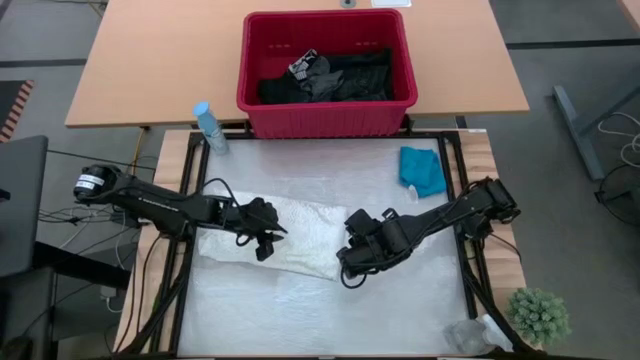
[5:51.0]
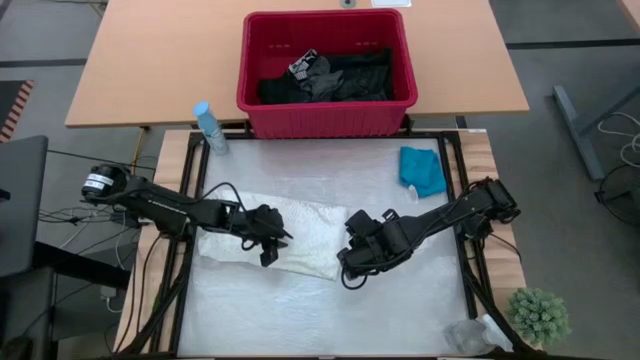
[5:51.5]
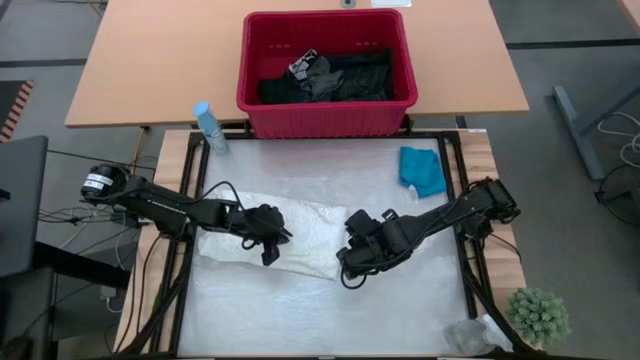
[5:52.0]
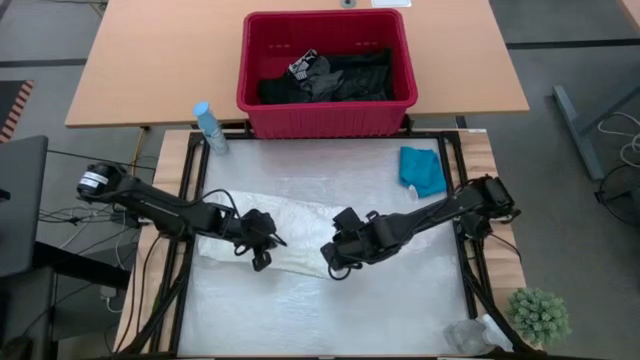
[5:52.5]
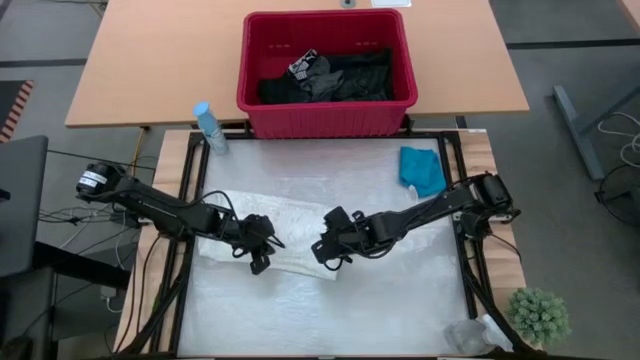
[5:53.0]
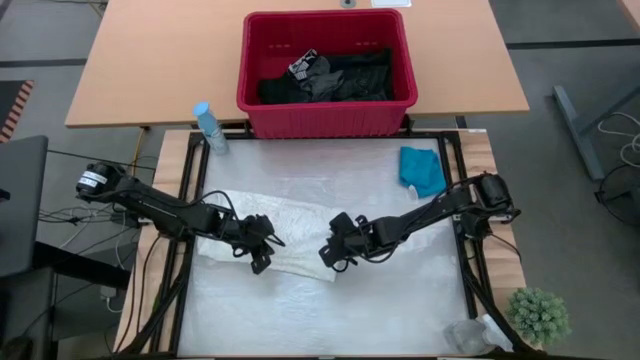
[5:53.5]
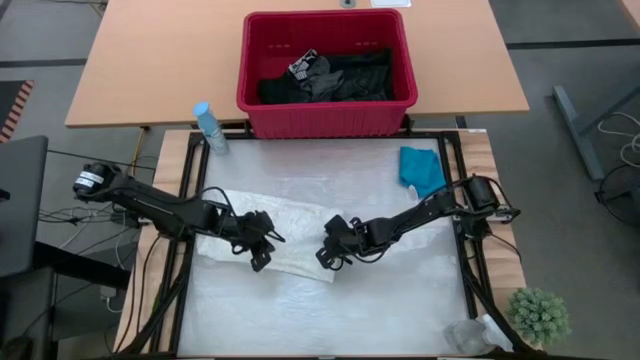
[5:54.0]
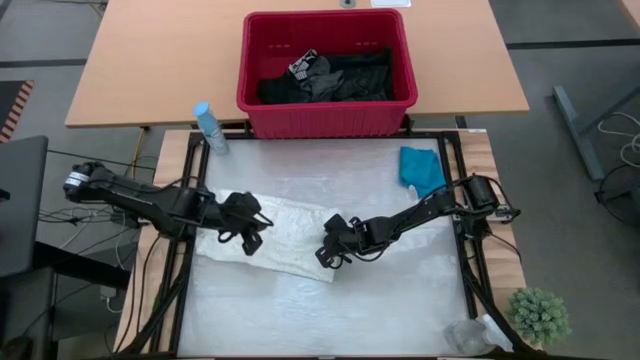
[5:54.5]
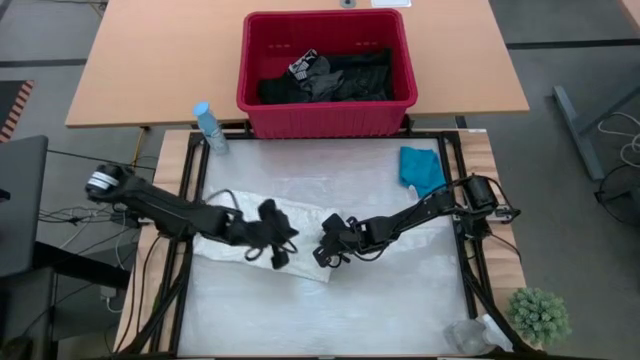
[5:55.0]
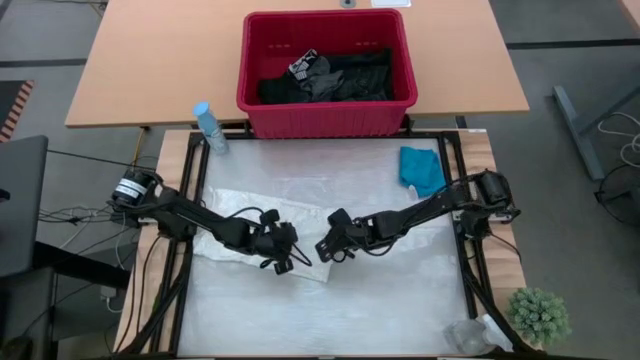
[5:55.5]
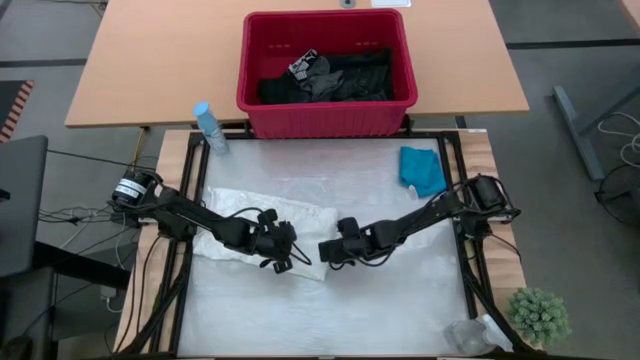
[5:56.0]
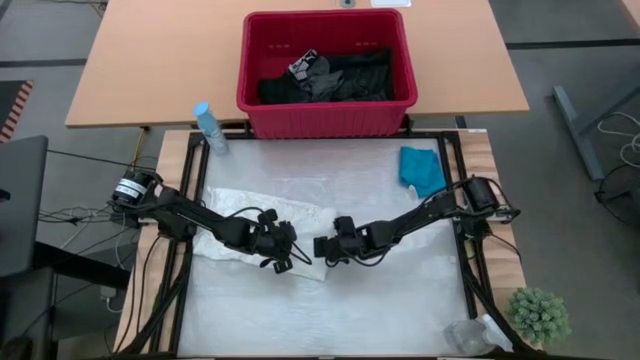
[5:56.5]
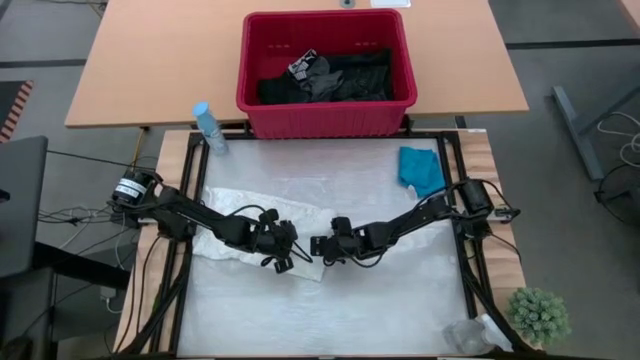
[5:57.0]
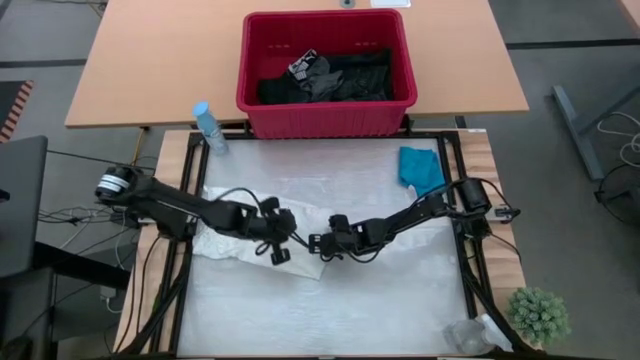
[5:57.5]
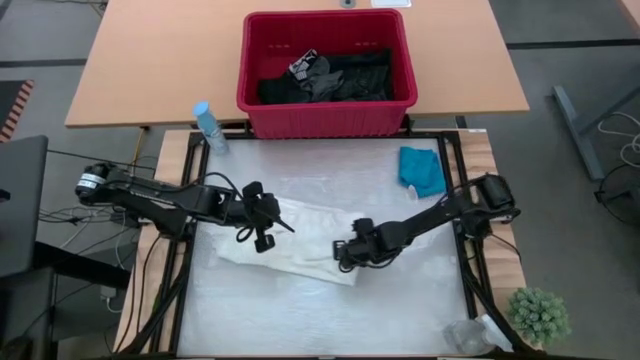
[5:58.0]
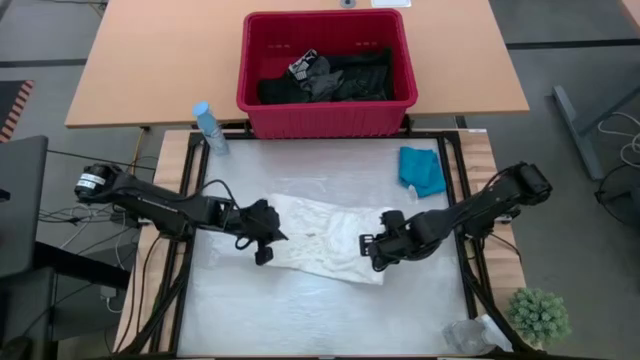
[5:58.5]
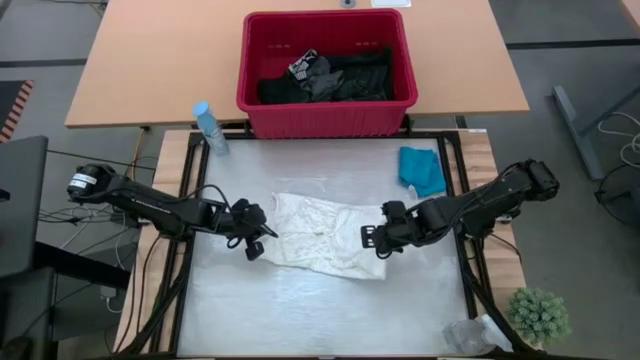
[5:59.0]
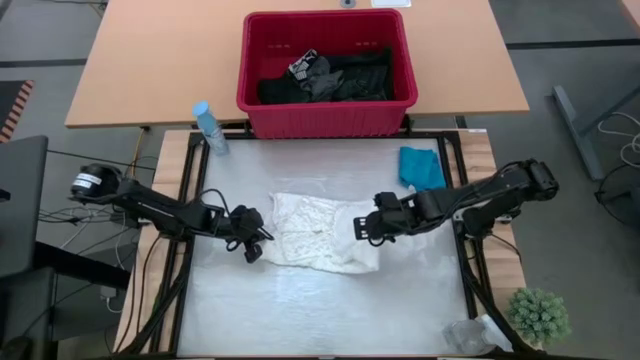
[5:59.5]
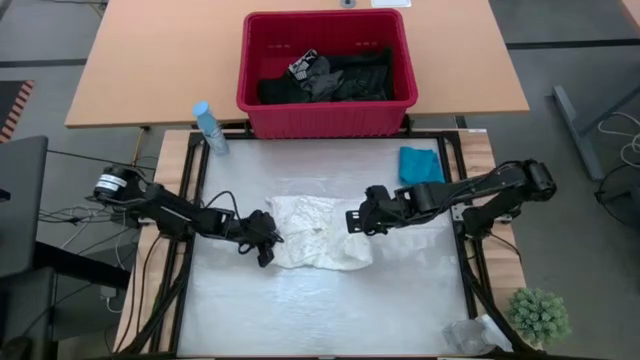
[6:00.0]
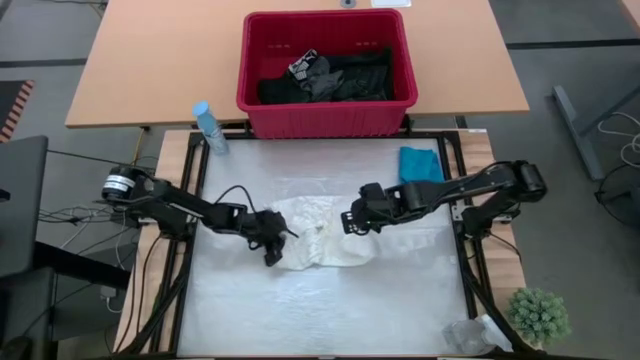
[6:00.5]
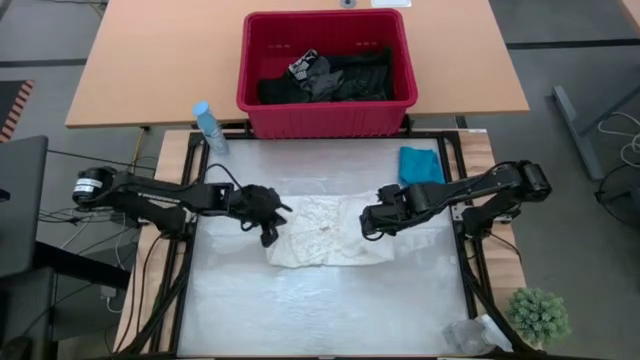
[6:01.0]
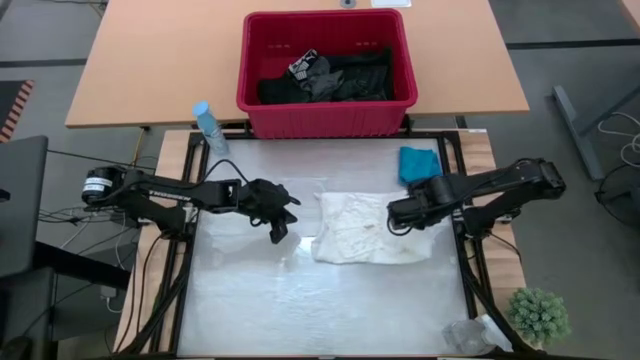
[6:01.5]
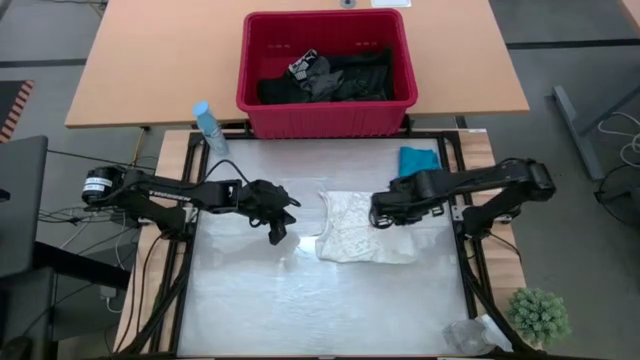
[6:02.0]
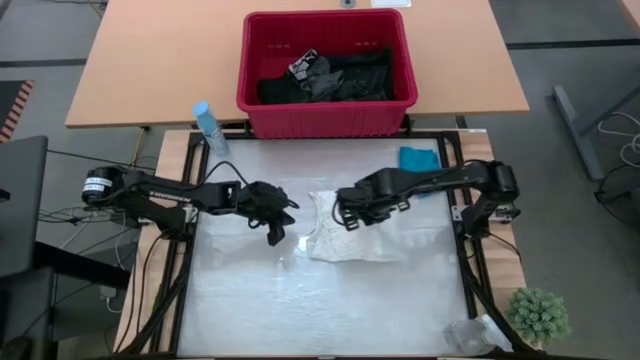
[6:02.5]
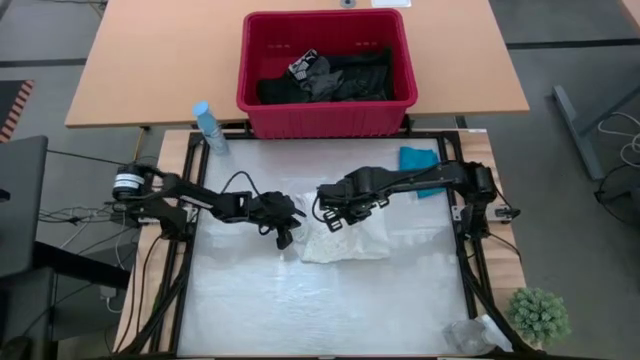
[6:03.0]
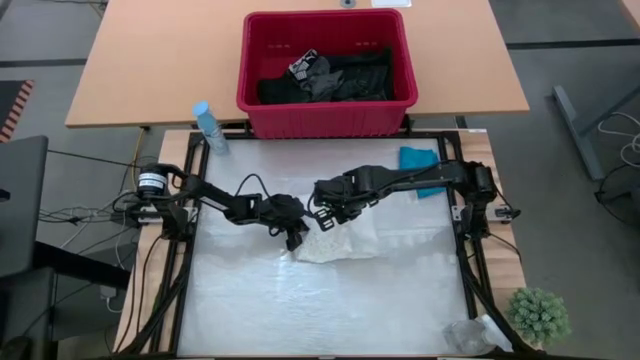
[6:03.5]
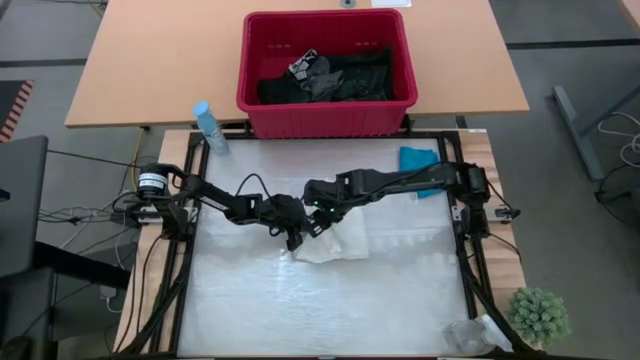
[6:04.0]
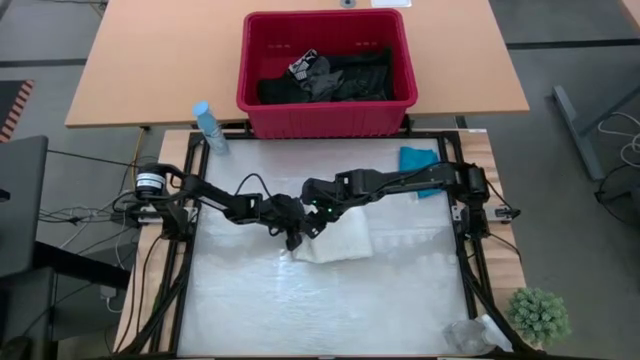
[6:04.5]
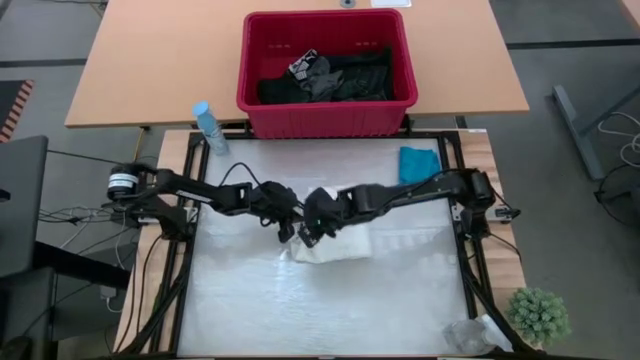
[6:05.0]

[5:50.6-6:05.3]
Task: Fold laundry
Fold the white shirt

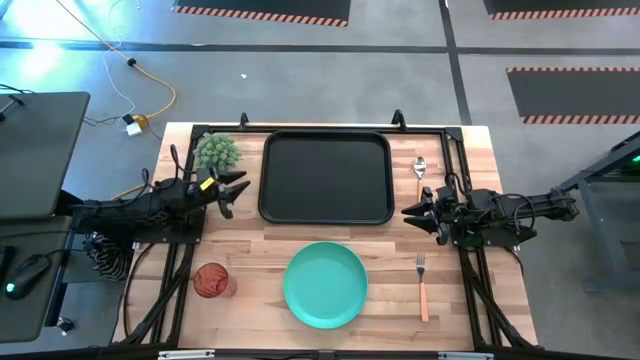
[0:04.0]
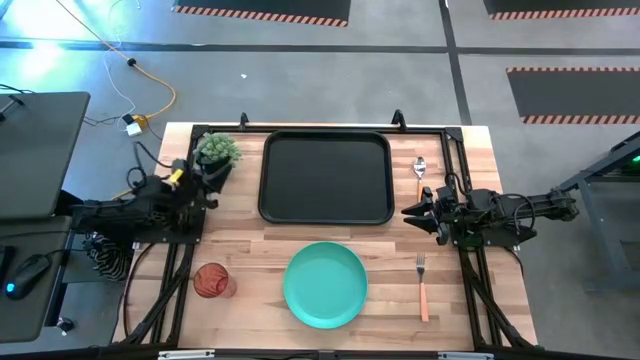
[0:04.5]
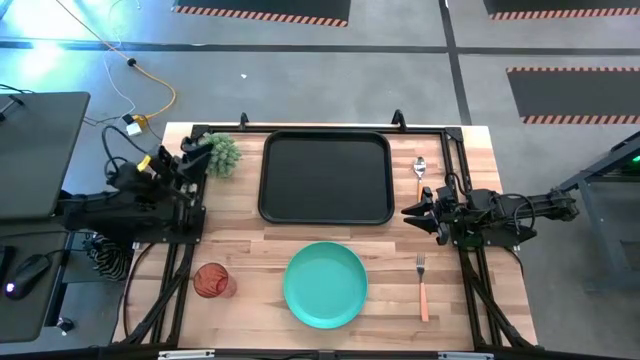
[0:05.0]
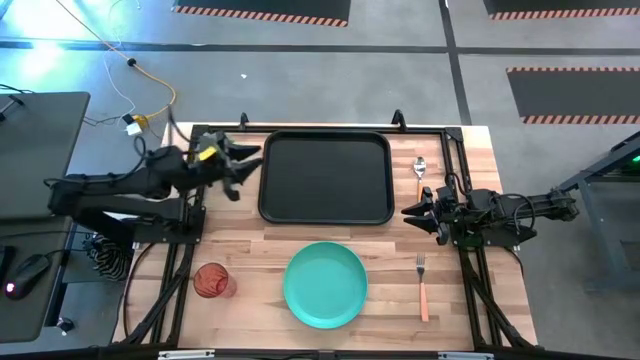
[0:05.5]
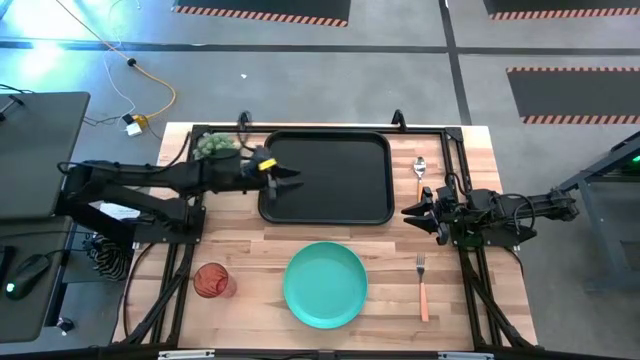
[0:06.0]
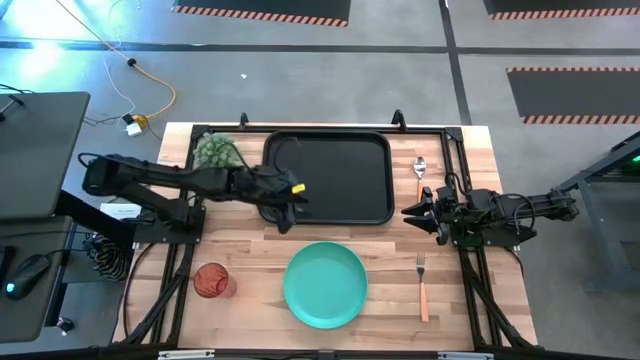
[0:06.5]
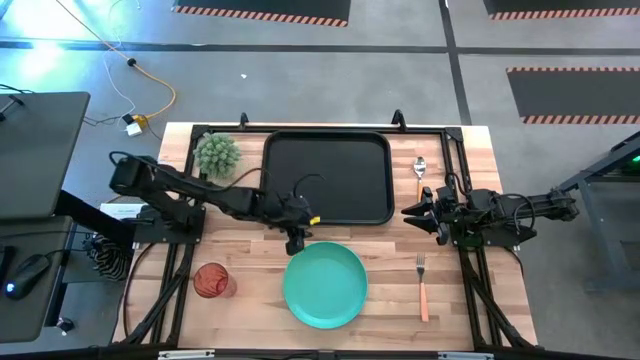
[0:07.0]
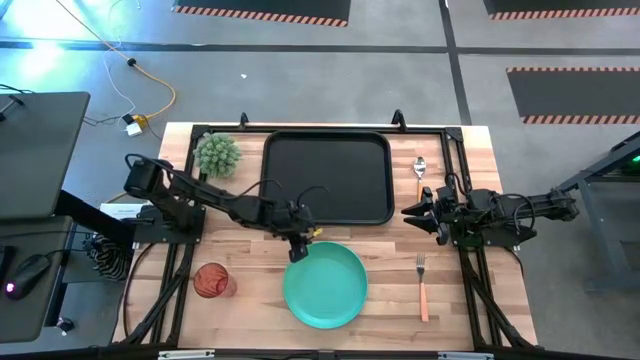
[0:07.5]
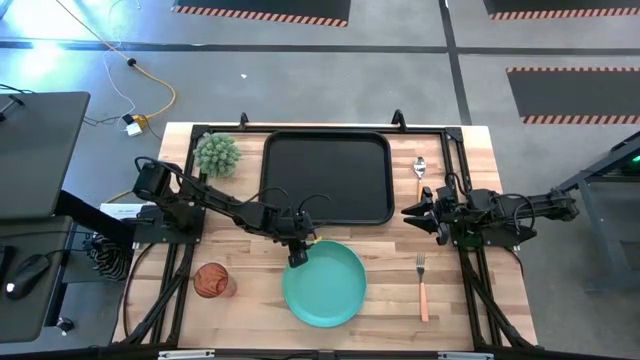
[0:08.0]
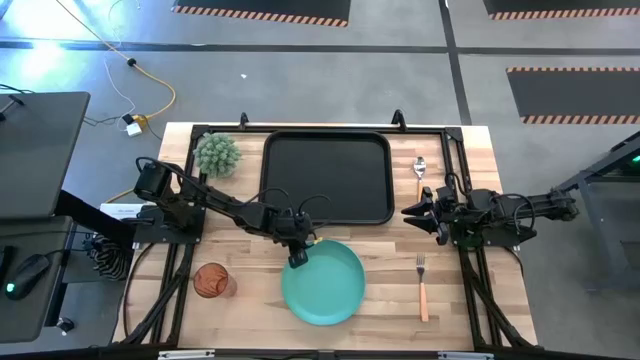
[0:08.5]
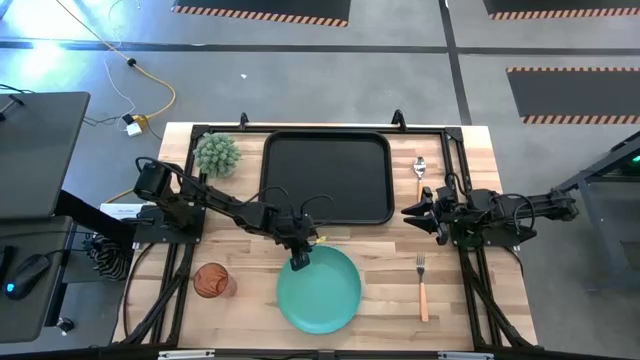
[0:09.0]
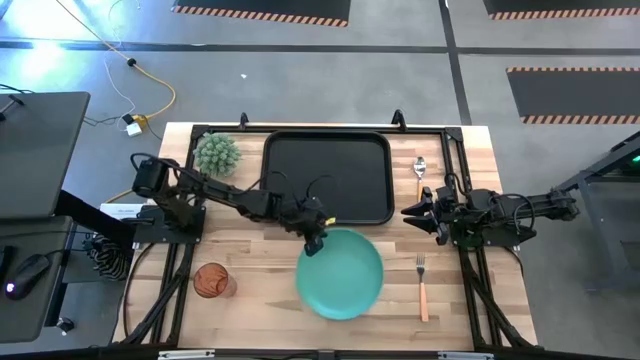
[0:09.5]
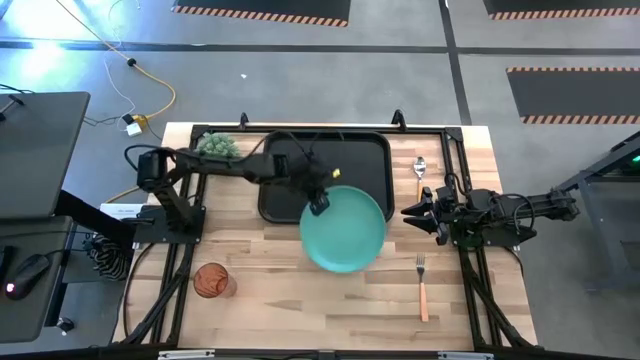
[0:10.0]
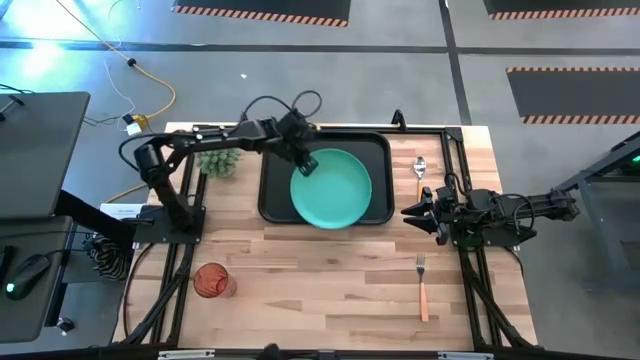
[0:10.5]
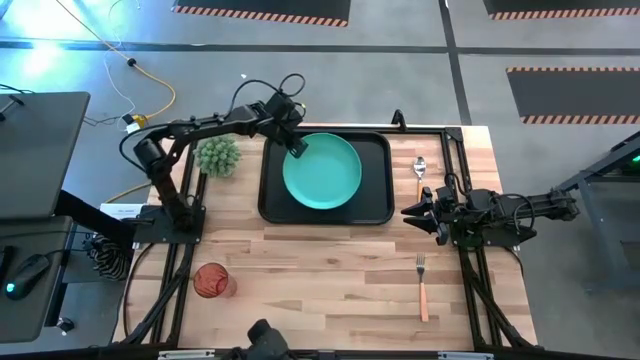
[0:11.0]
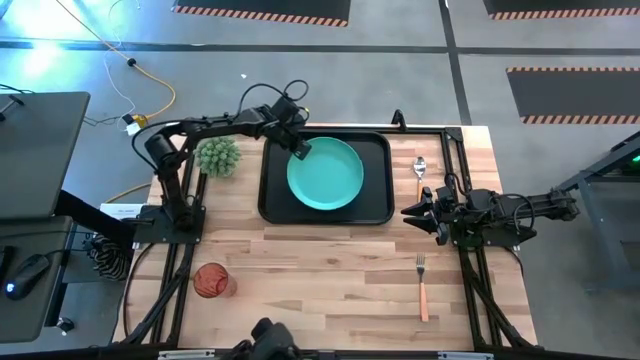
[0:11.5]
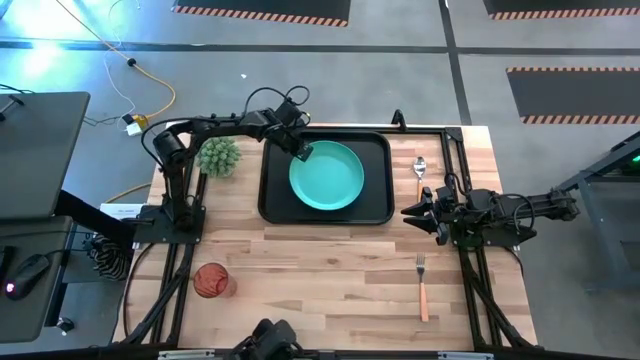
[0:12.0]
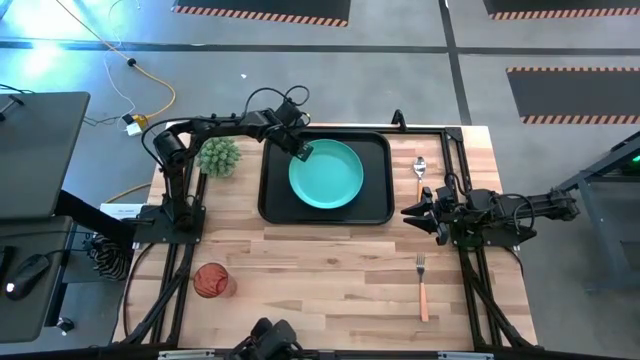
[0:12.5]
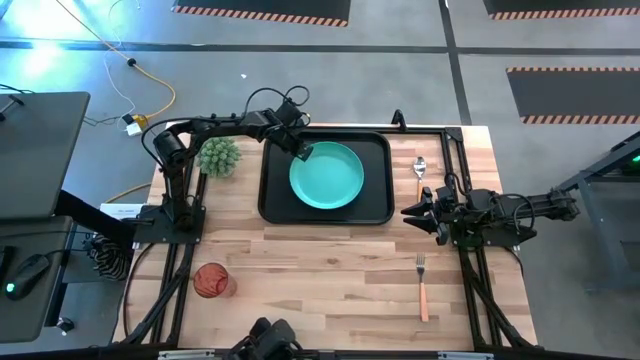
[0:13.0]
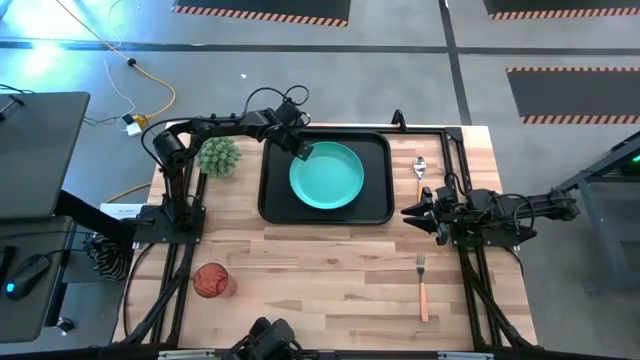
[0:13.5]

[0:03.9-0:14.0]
Task: Pick and place plate/cup/fork/spoon on tray
Put the light blue plate onto the black tray
